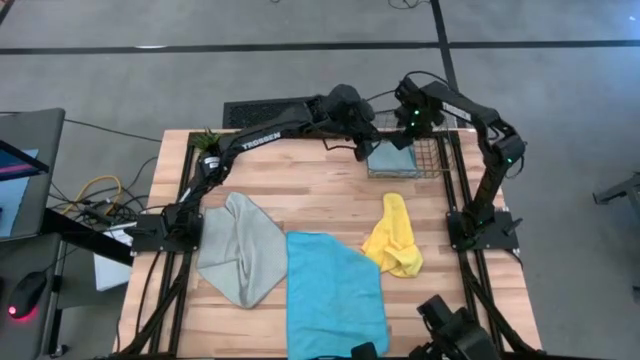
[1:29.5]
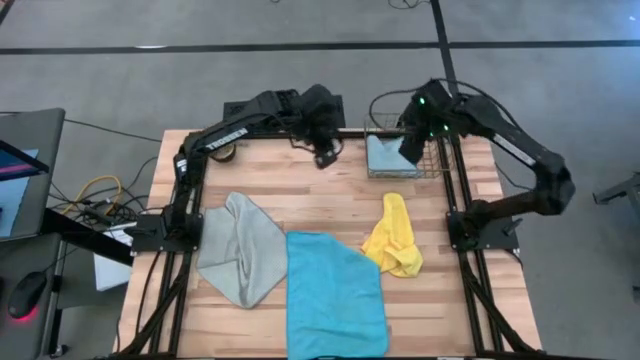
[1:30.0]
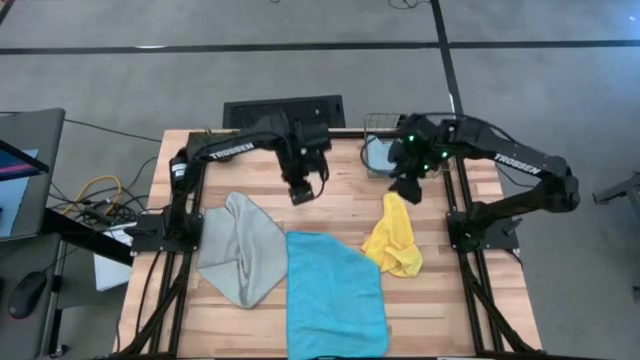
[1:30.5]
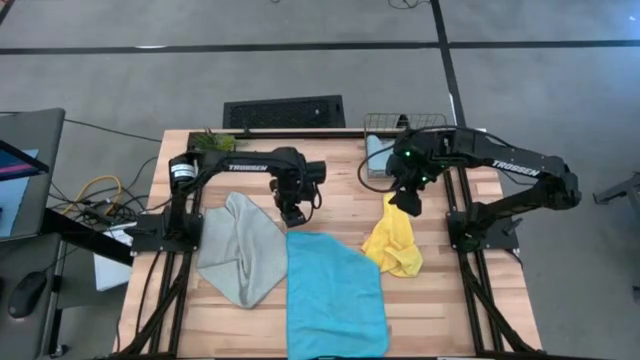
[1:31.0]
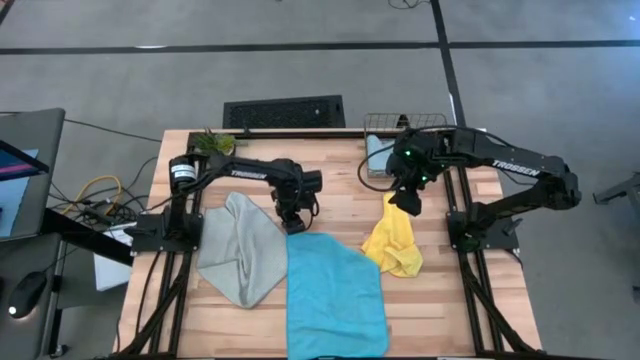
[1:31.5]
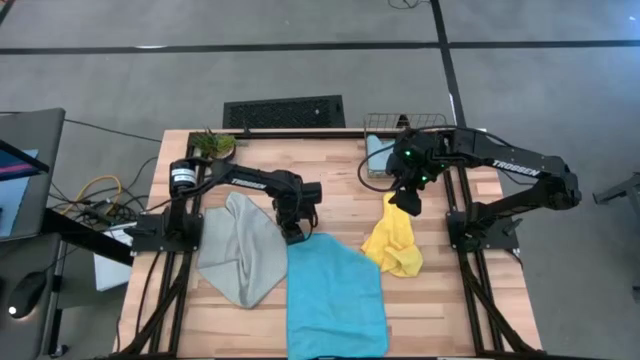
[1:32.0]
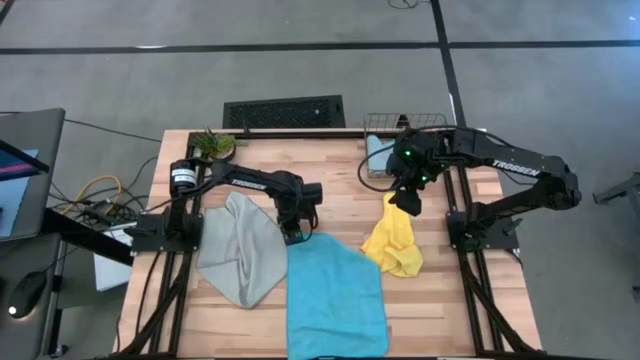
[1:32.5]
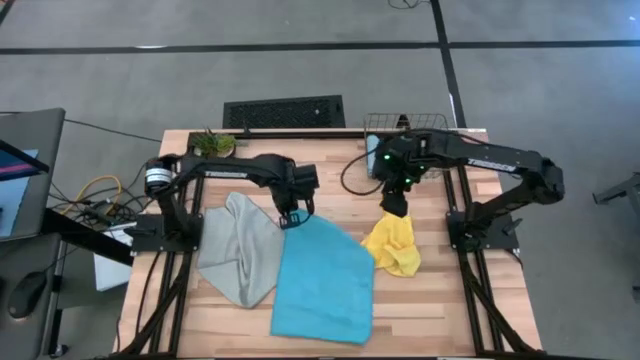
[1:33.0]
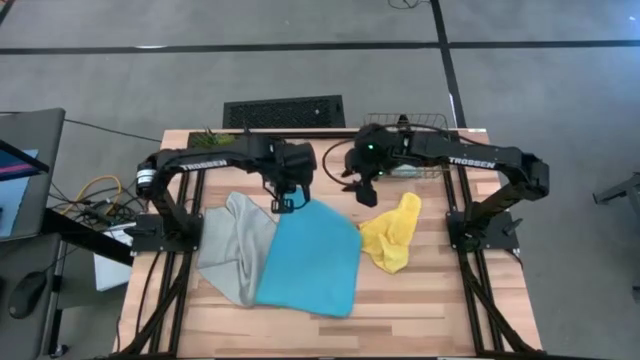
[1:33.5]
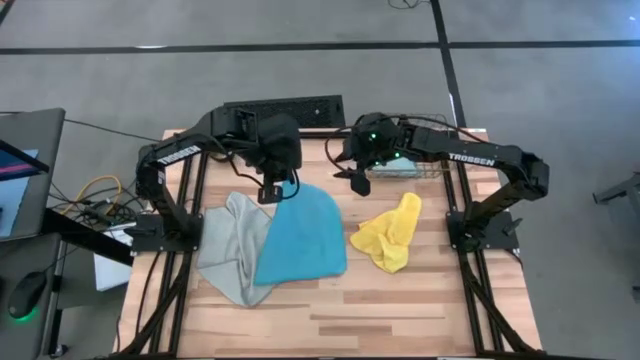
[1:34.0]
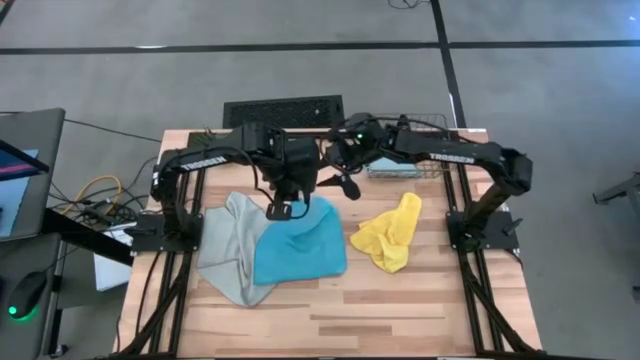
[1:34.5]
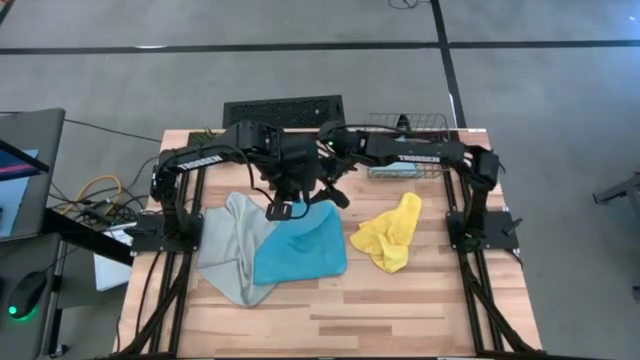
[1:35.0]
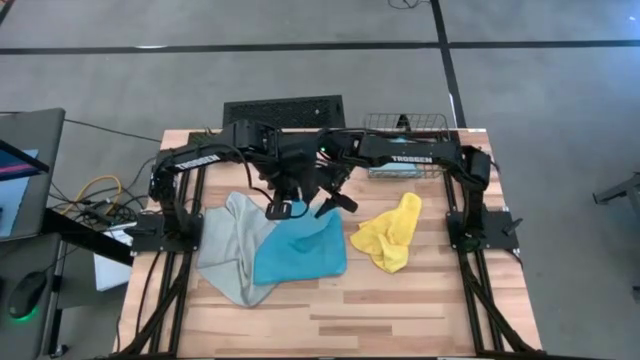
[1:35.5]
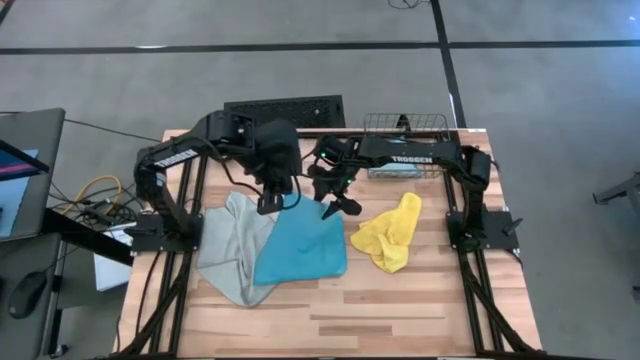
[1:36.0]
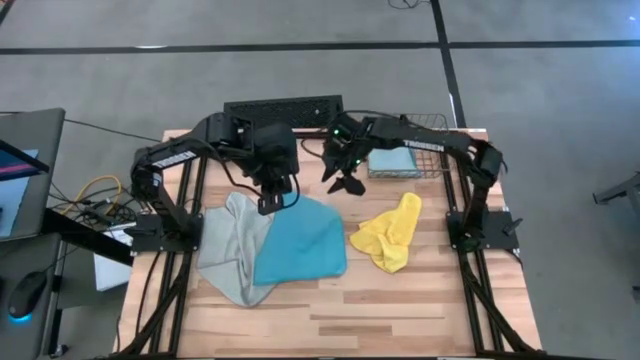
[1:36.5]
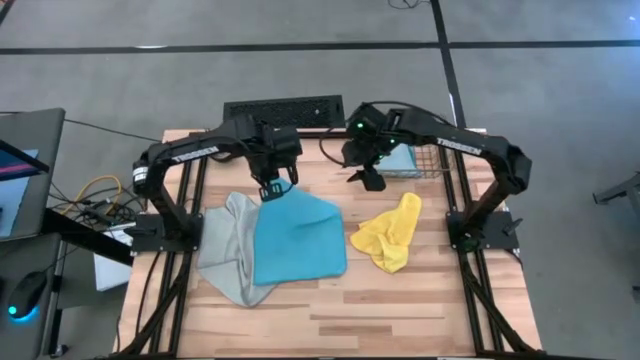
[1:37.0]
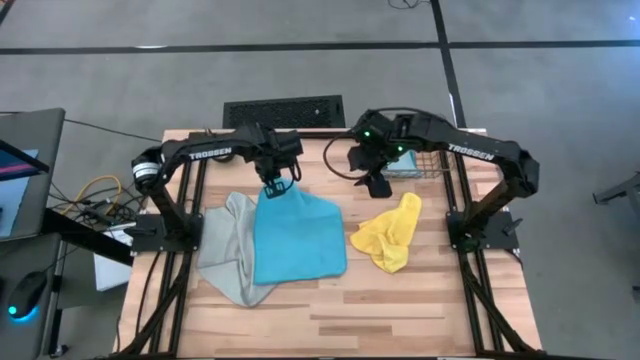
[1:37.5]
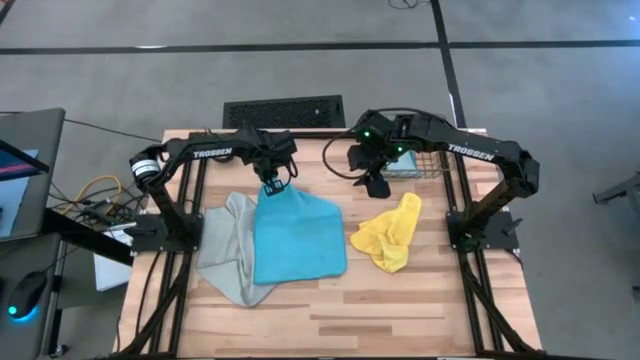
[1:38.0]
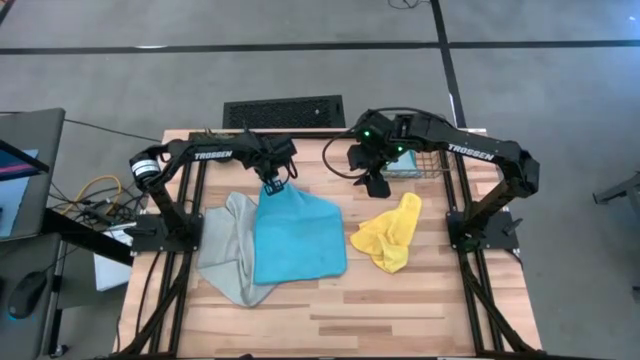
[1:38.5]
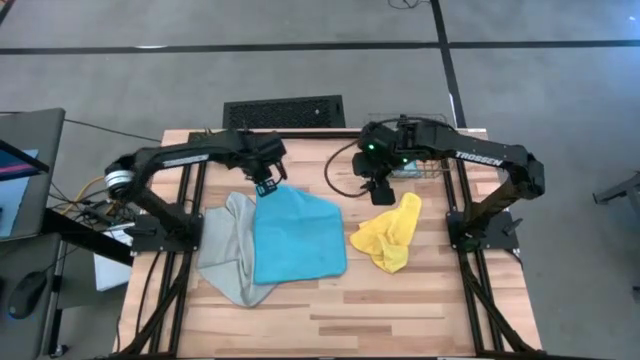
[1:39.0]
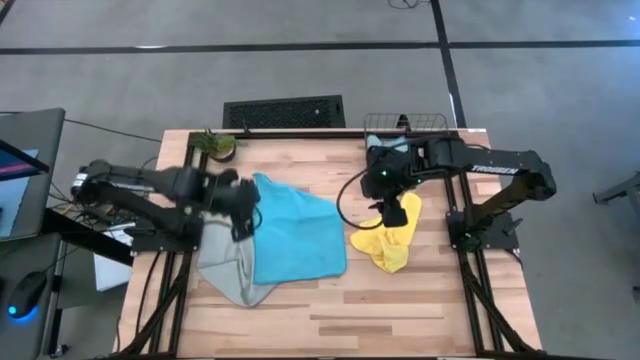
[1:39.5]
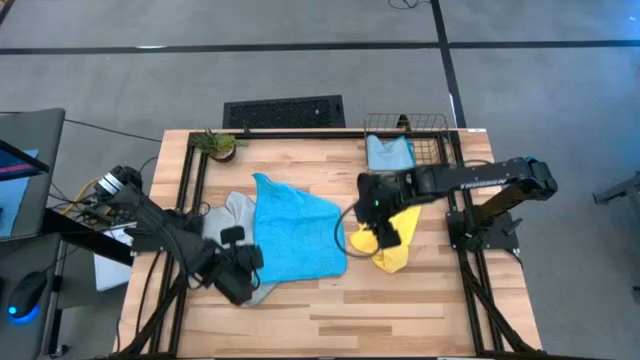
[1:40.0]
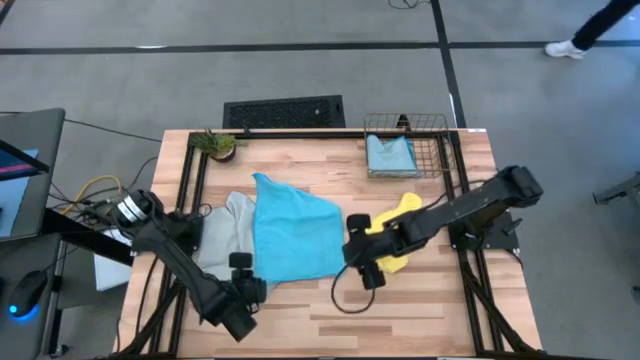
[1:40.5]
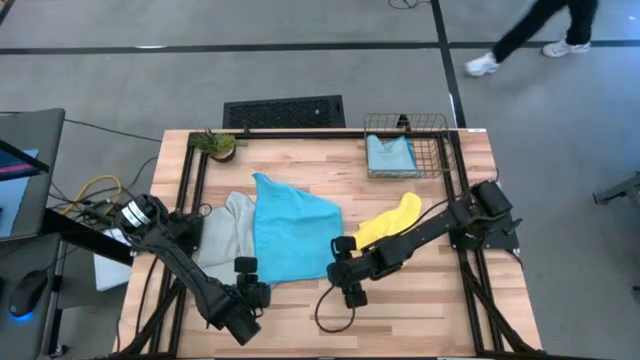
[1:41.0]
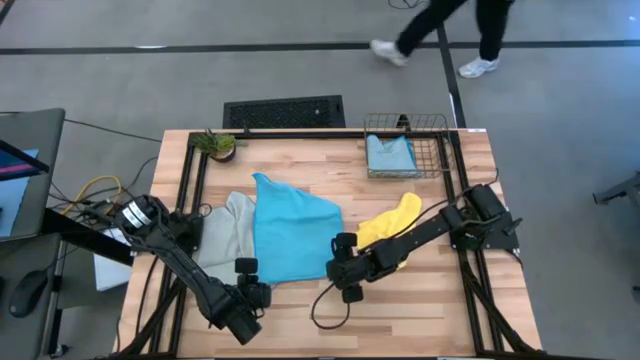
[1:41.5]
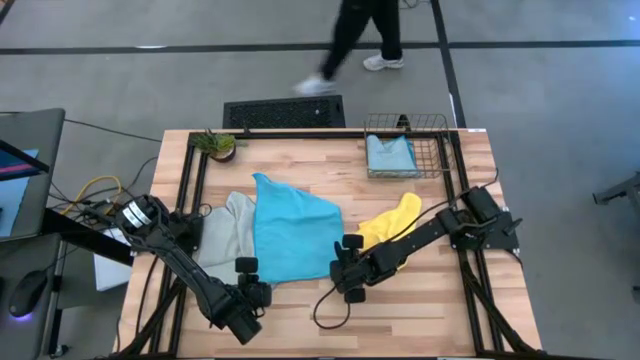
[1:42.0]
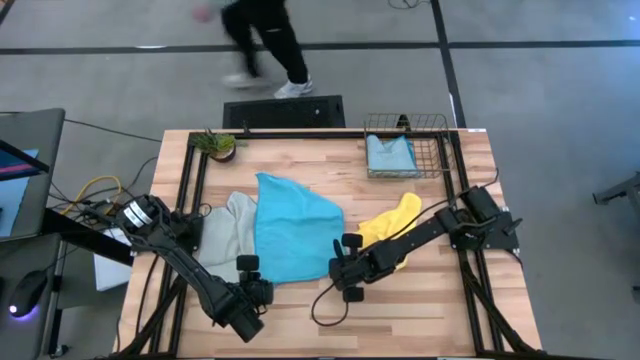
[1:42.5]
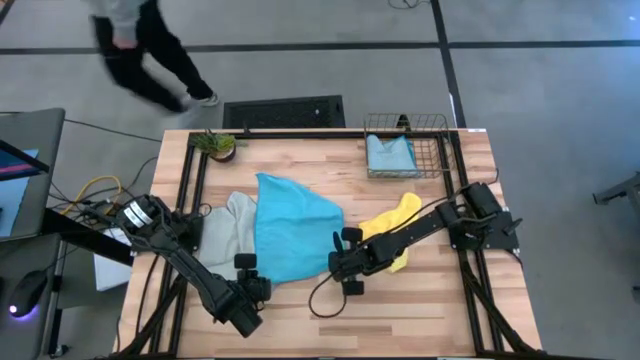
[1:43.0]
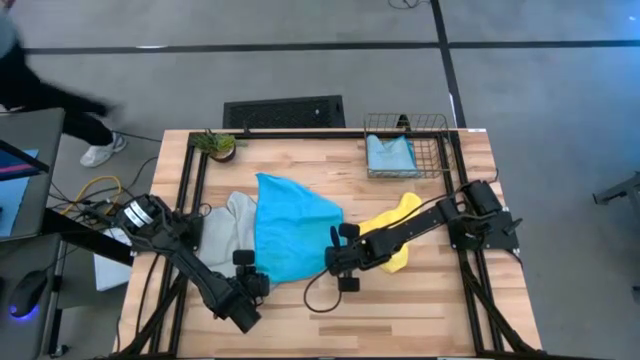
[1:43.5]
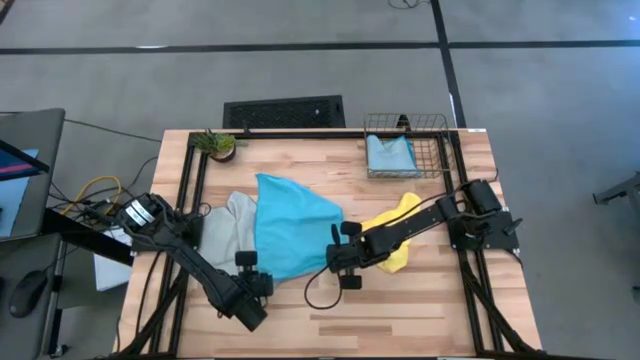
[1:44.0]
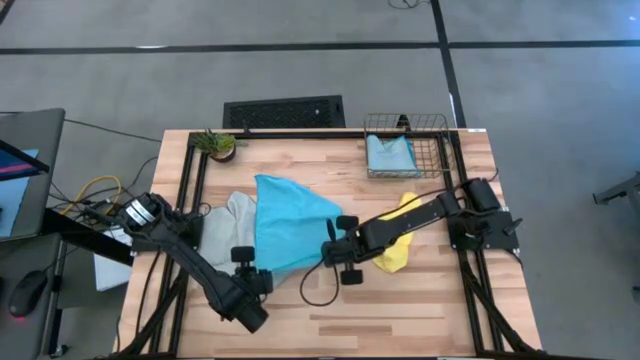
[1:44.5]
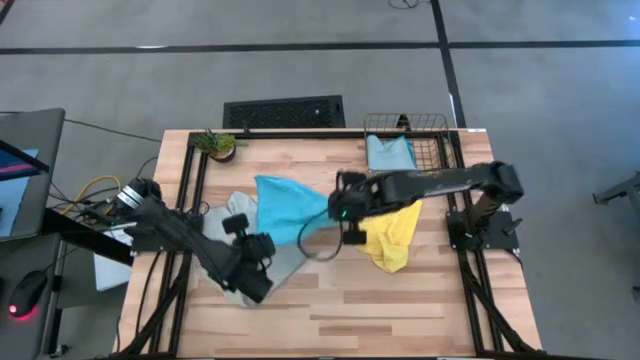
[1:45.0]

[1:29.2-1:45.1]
Task: Fold microfiber towels
Fold the blue microfiber cloth

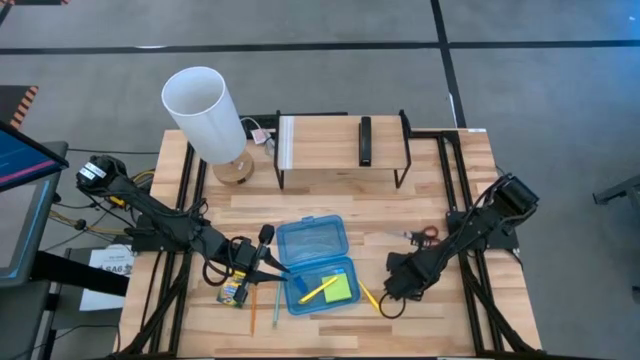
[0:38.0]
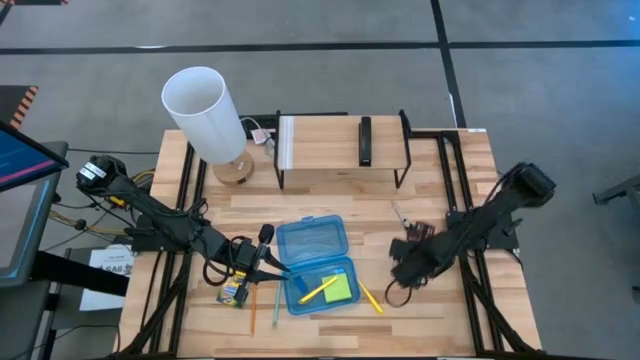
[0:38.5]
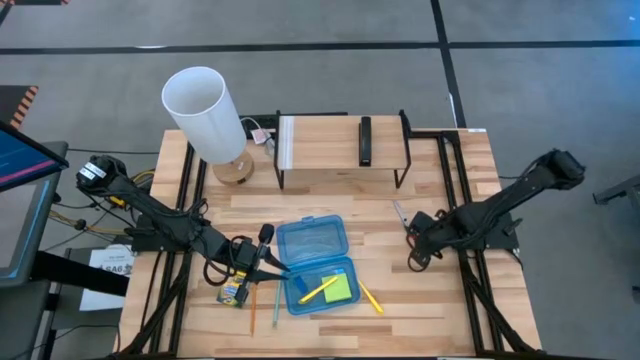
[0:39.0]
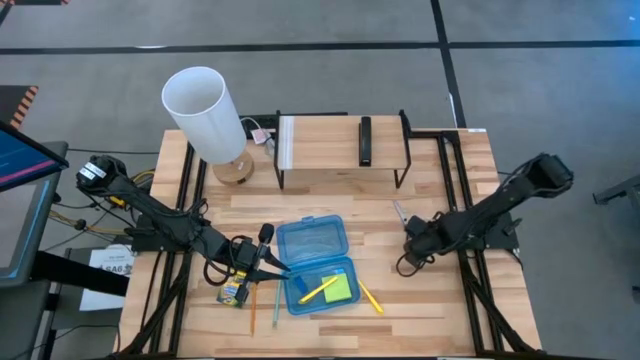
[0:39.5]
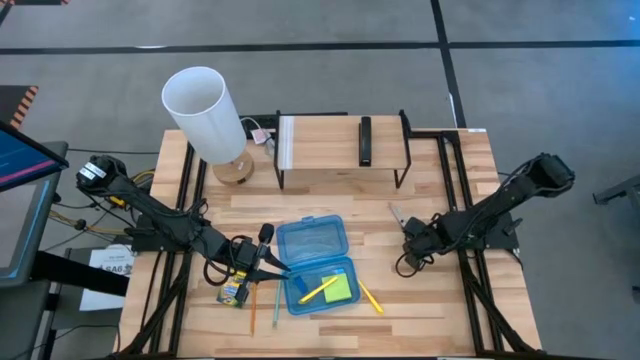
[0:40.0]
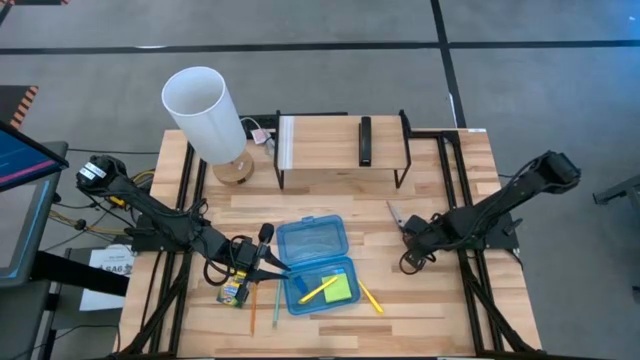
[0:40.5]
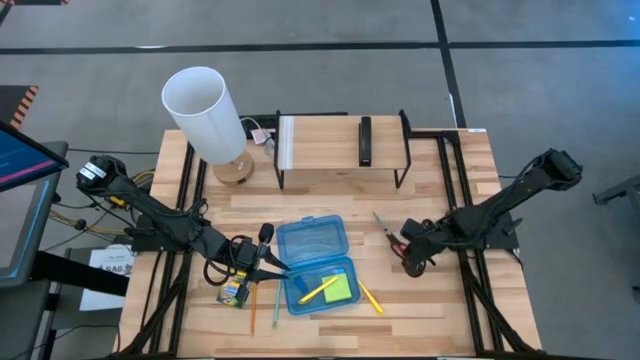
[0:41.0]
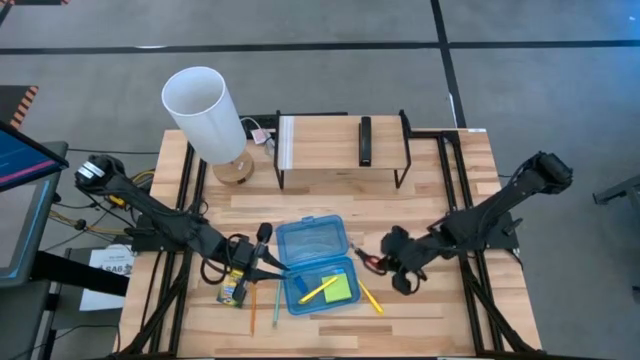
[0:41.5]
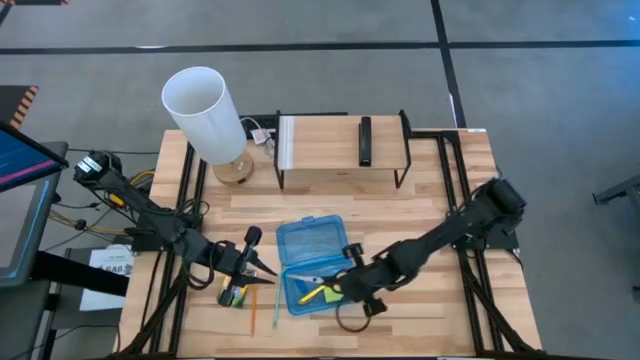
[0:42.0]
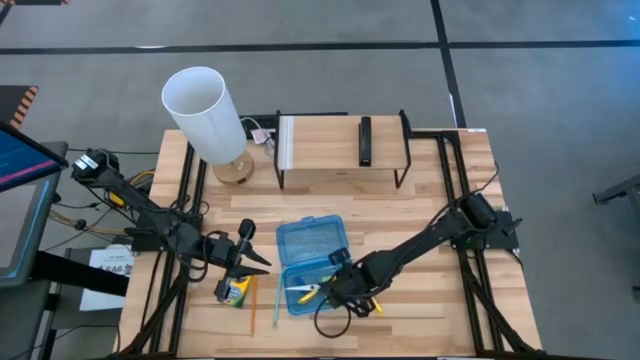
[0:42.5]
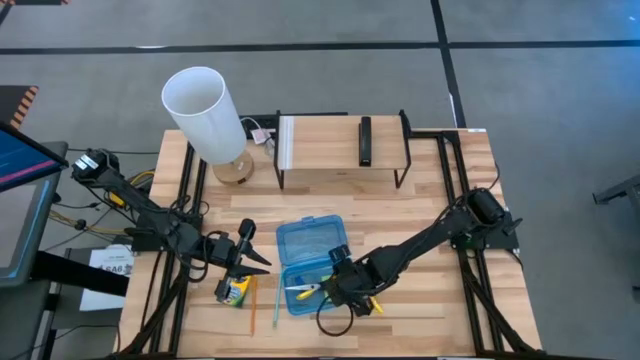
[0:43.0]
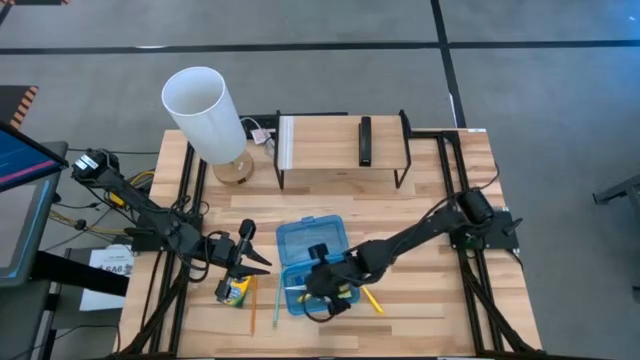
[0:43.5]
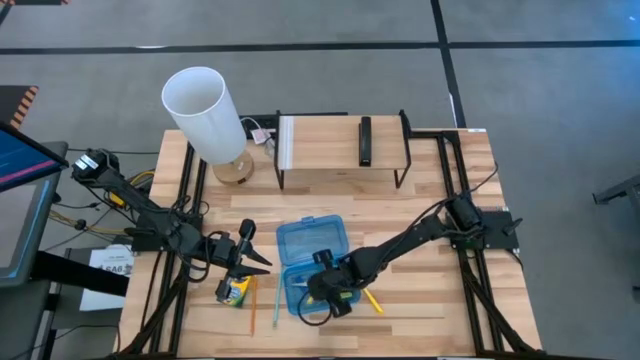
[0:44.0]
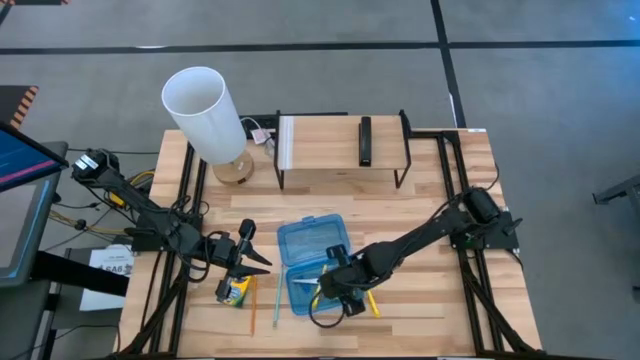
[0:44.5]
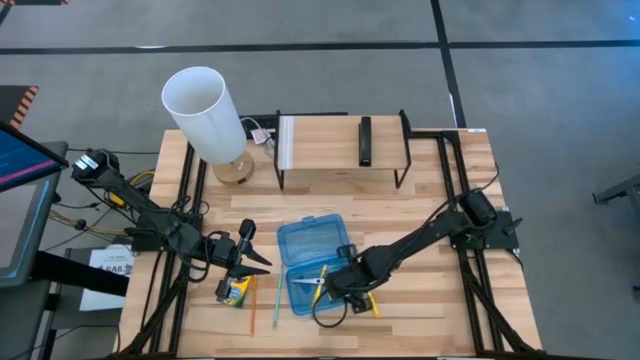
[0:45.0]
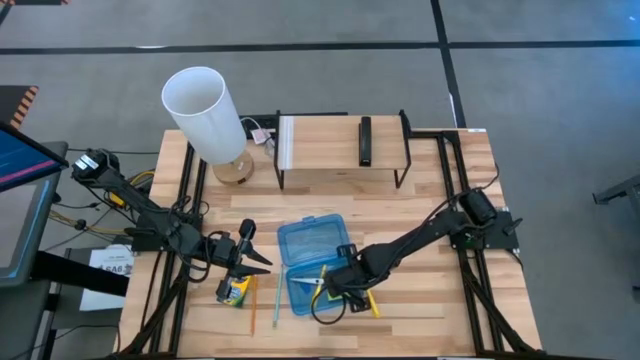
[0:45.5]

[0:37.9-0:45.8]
Task: Pack school essentials
Put the black scissors into the blue supply box
